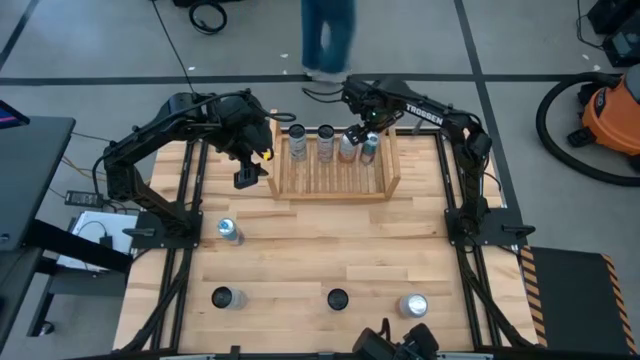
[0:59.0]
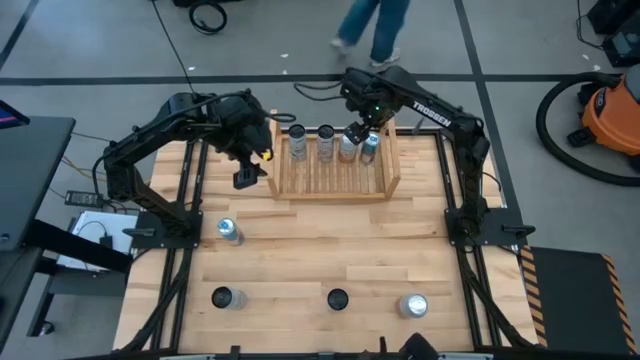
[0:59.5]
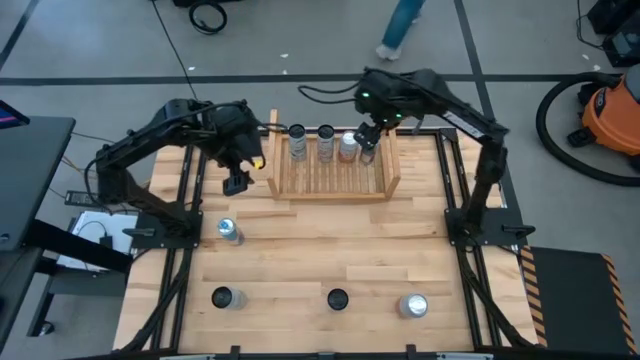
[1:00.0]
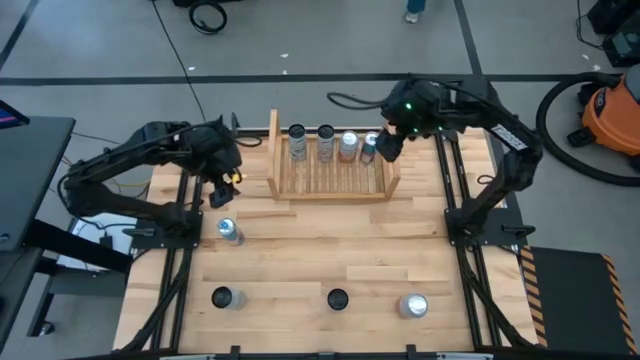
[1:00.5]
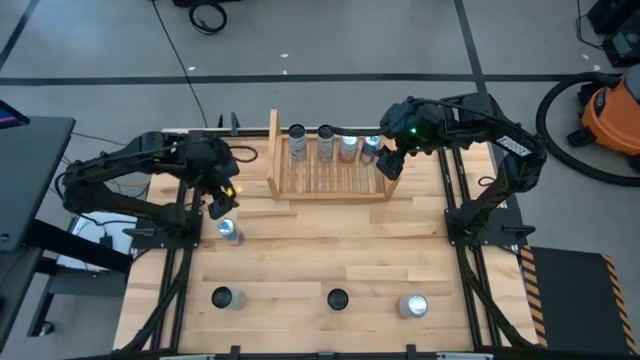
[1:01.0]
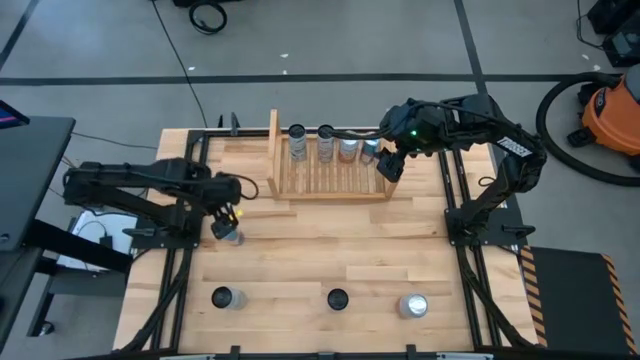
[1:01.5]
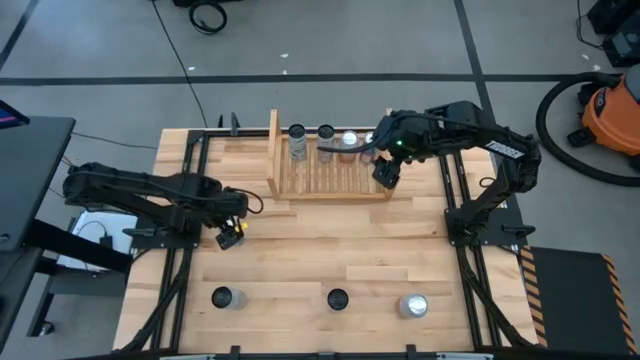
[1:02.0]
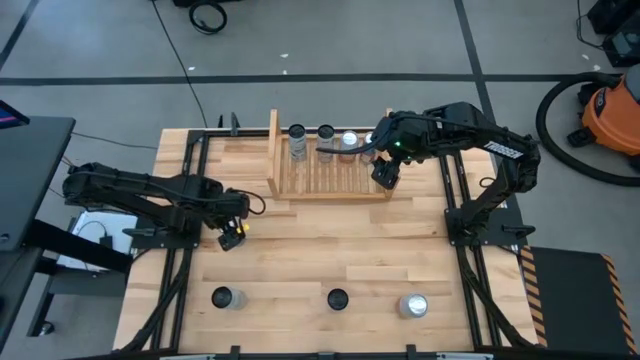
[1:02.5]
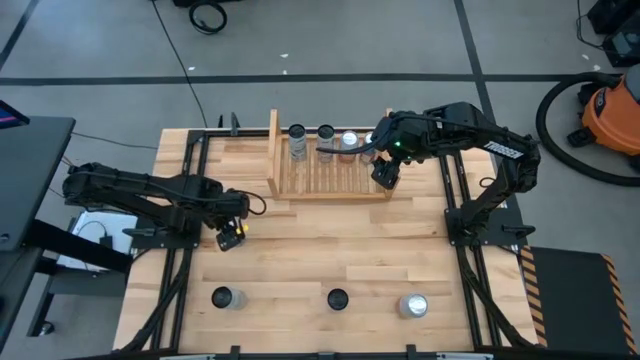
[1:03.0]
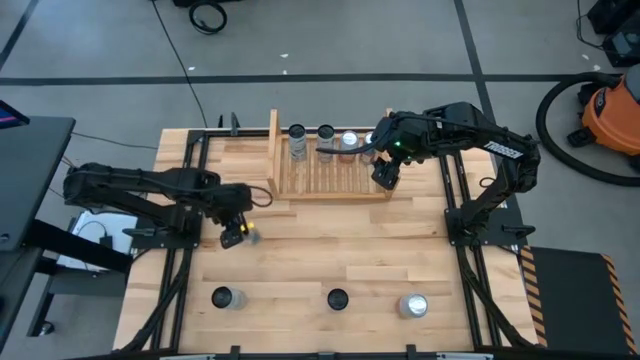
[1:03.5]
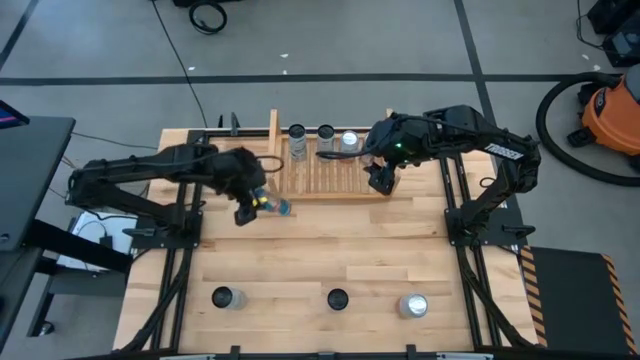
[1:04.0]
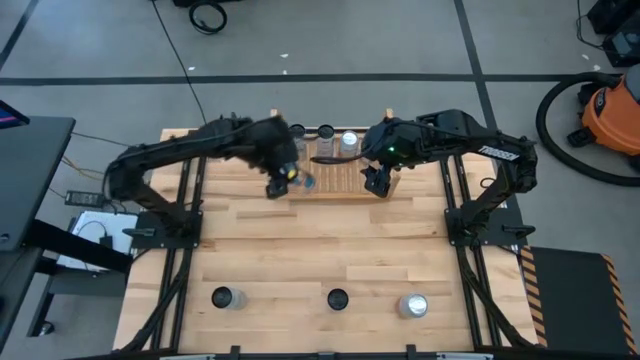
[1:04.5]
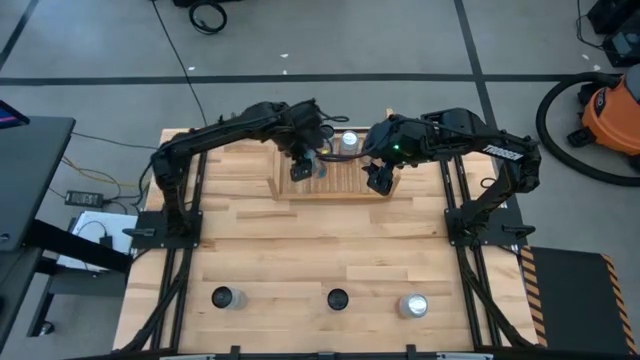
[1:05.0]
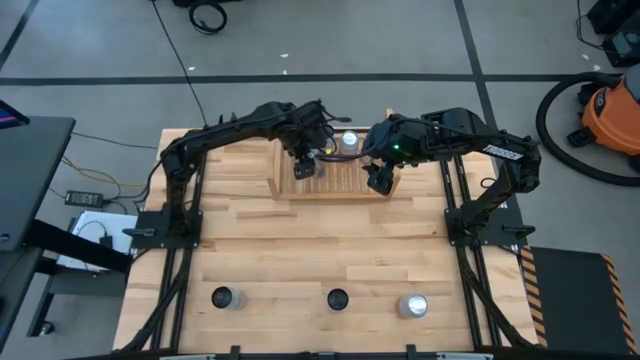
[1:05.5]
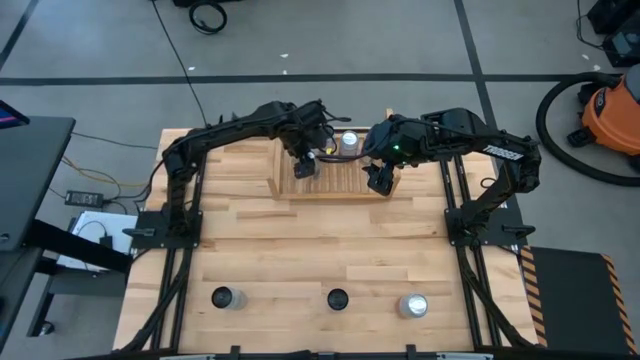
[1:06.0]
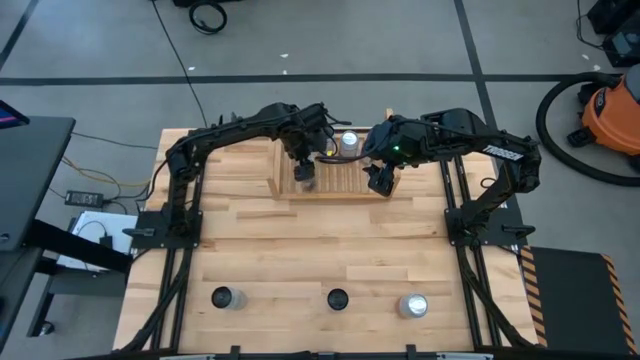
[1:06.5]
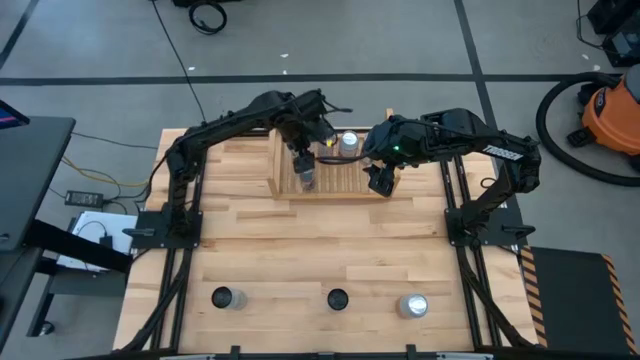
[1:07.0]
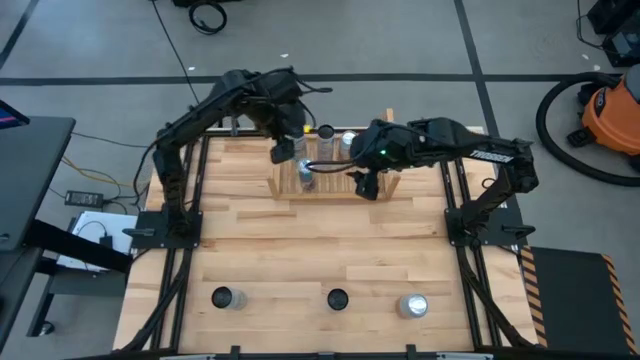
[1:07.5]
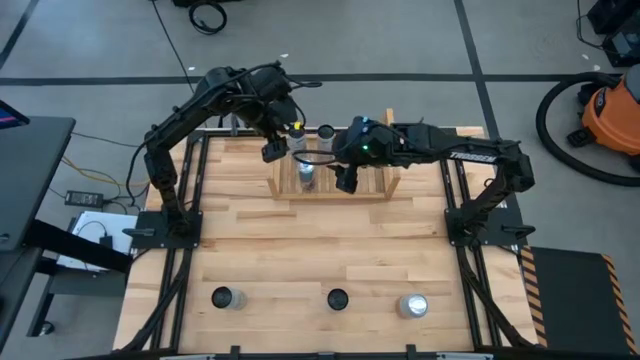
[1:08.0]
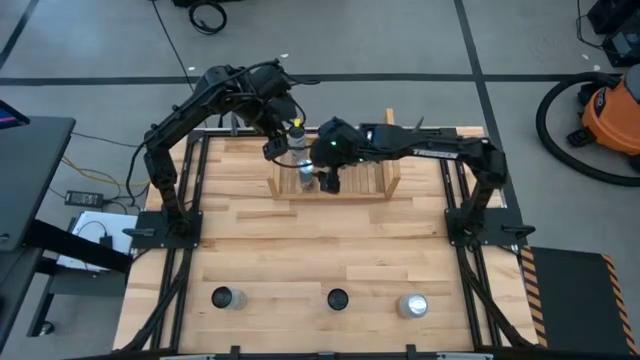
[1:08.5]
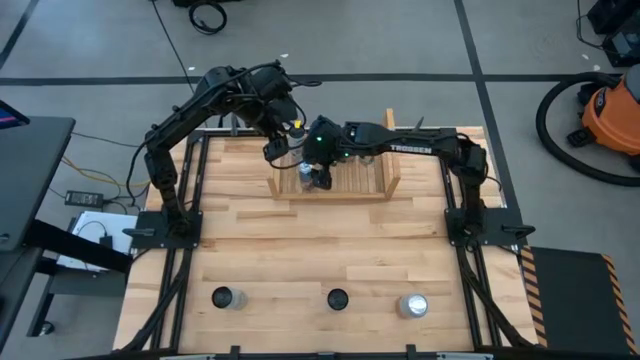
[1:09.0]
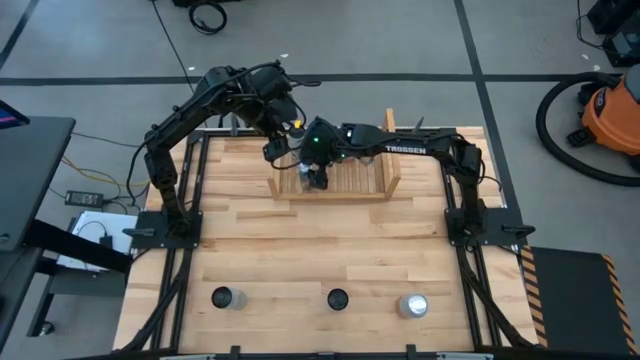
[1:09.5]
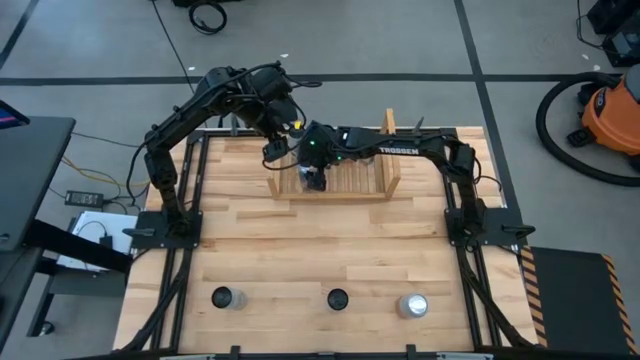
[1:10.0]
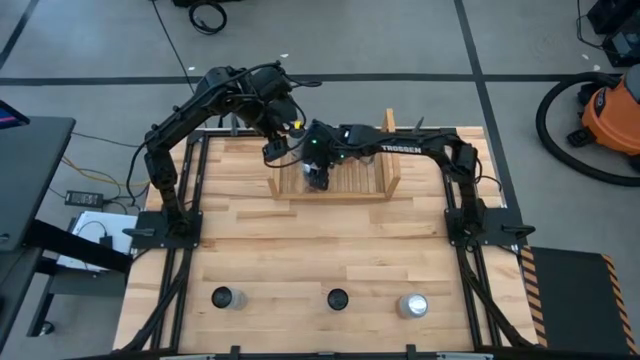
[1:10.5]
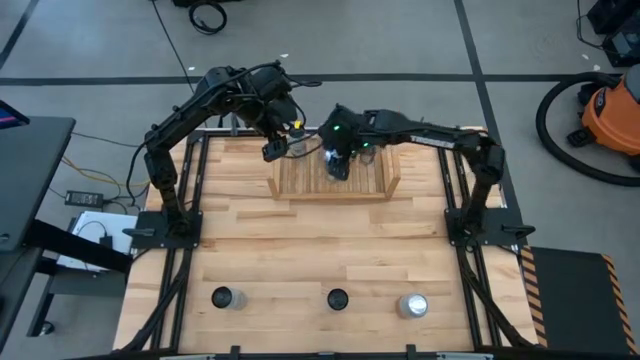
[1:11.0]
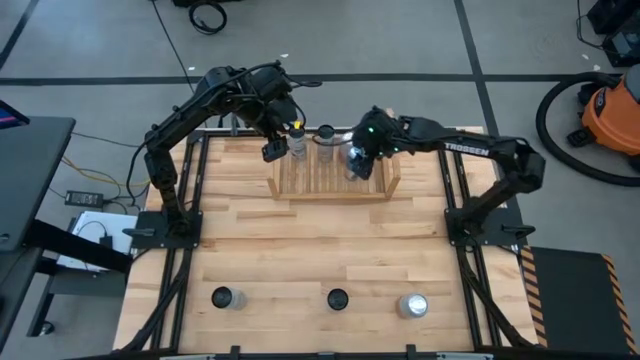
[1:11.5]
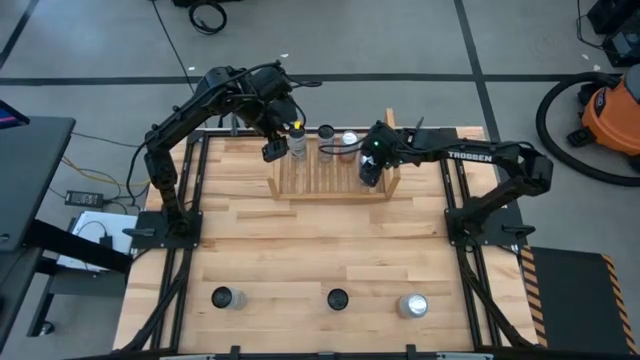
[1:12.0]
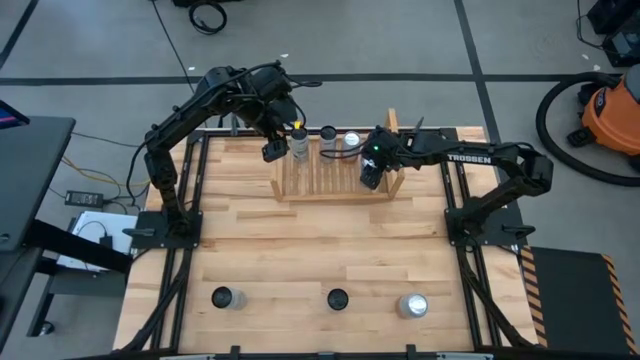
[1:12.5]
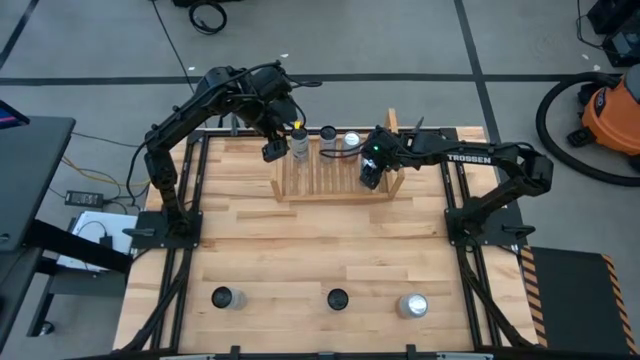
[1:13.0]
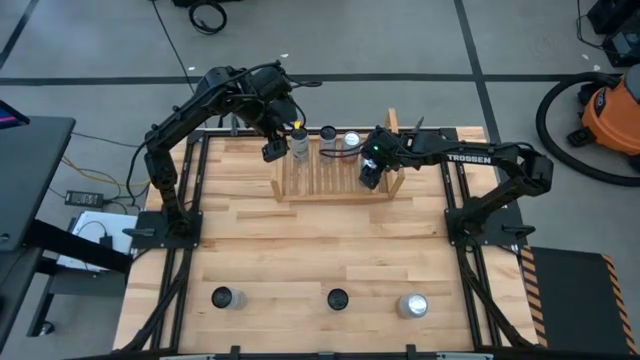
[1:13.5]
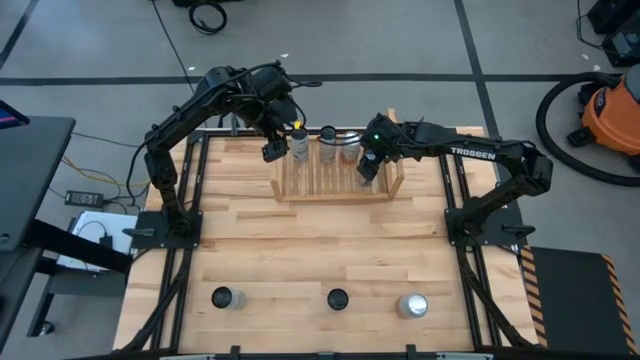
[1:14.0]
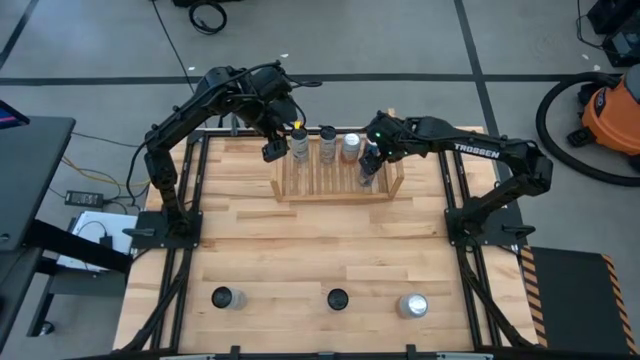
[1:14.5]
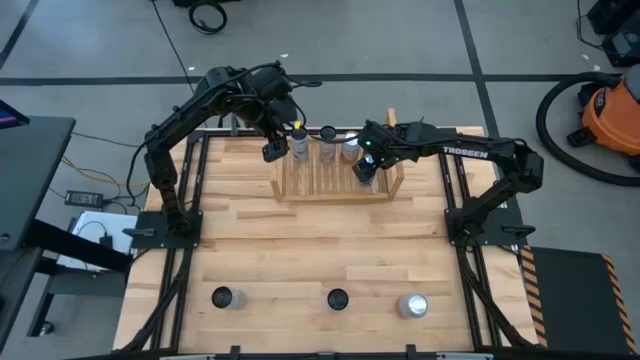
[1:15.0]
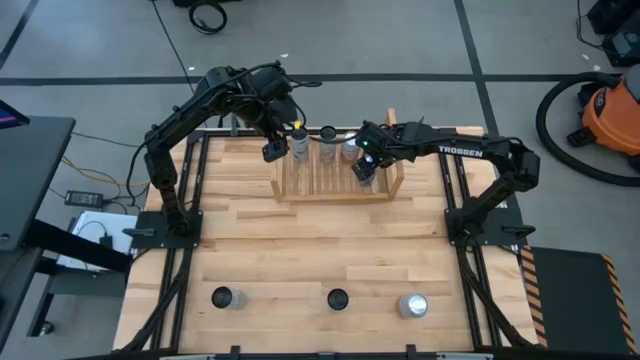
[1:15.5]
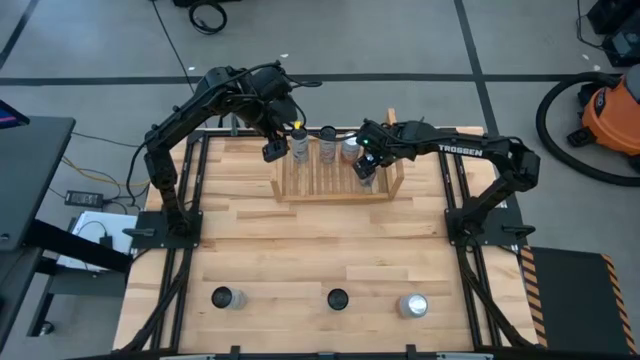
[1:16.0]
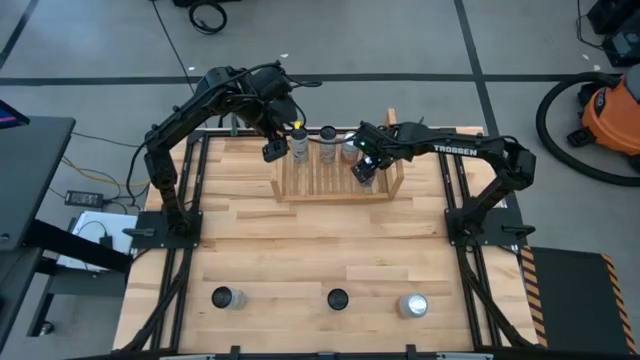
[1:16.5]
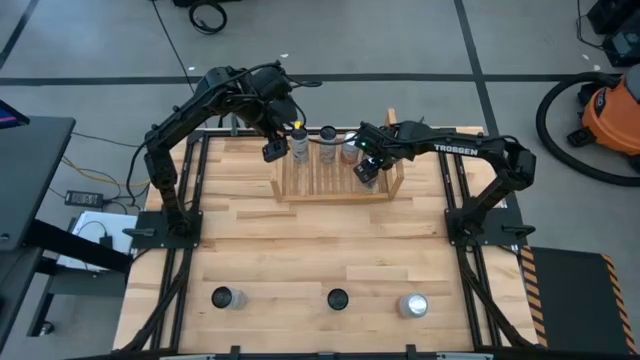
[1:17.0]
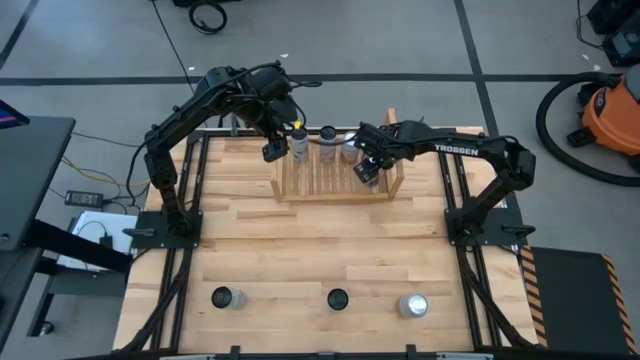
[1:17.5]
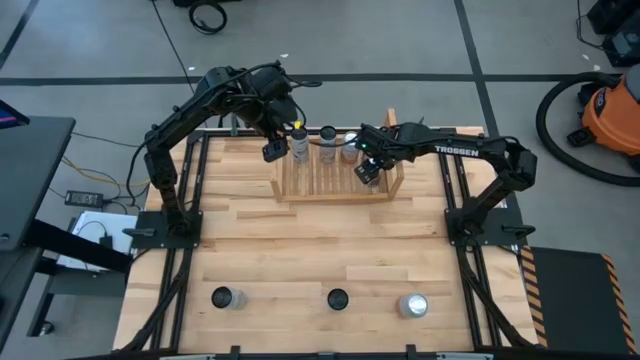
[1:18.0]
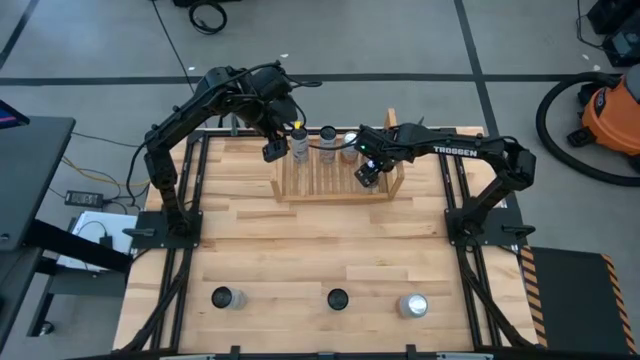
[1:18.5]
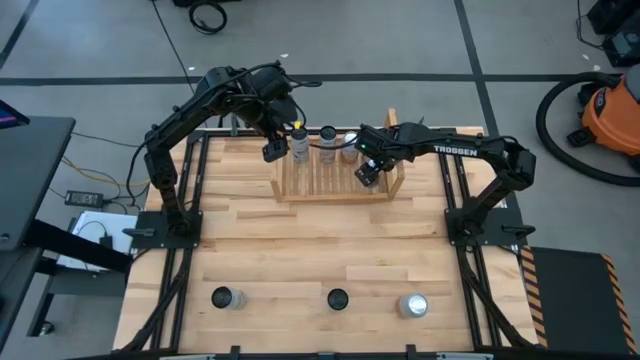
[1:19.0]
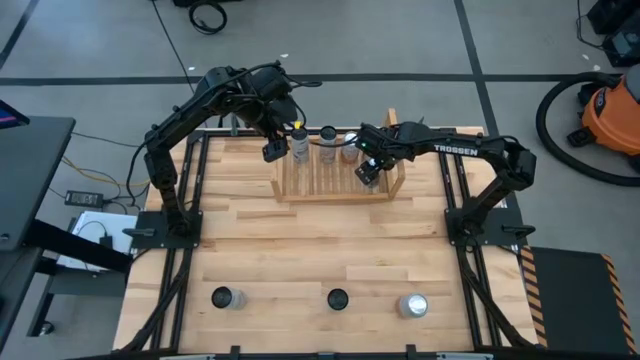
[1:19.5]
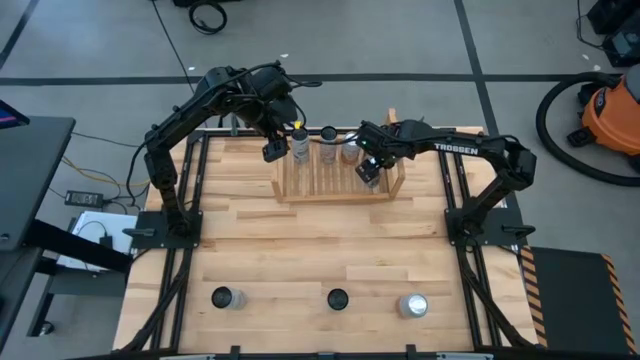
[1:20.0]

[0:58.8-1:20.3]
Task: Place canned beverage on shelf
Put the blue soda can into the shelf
